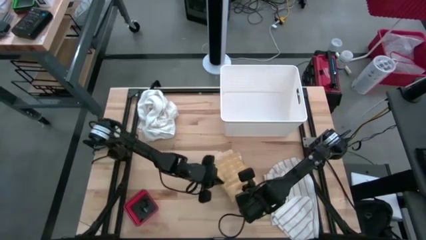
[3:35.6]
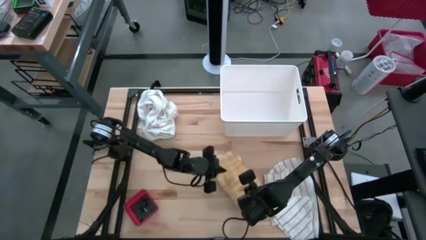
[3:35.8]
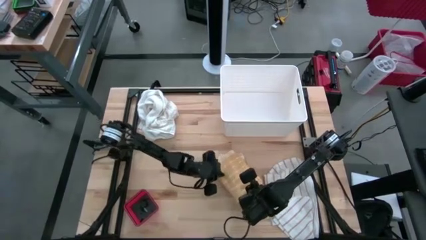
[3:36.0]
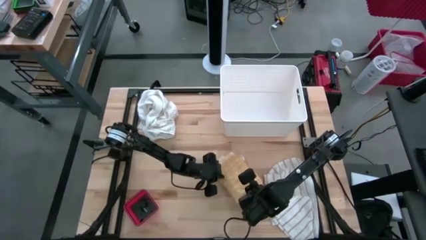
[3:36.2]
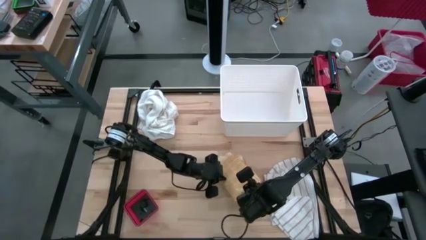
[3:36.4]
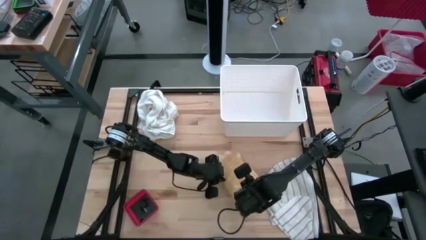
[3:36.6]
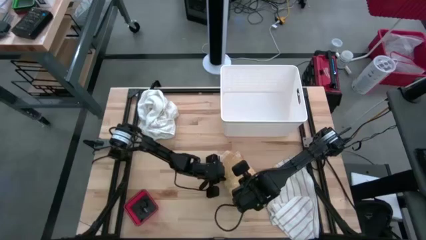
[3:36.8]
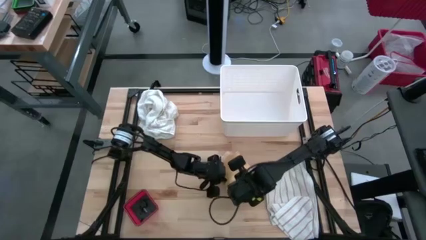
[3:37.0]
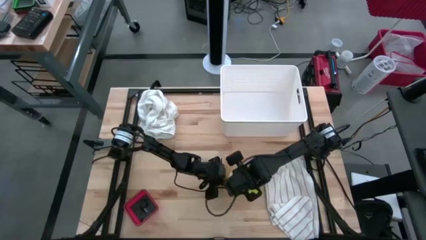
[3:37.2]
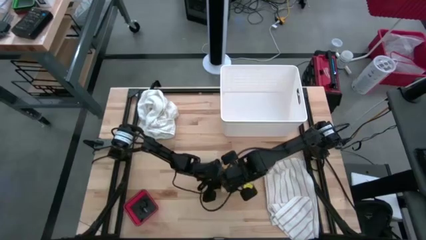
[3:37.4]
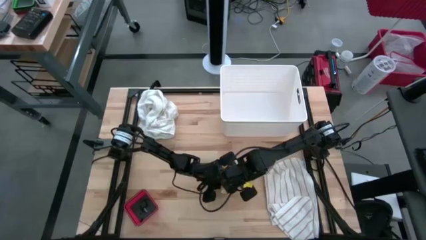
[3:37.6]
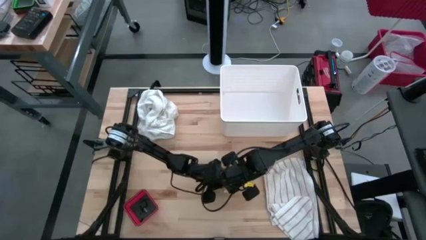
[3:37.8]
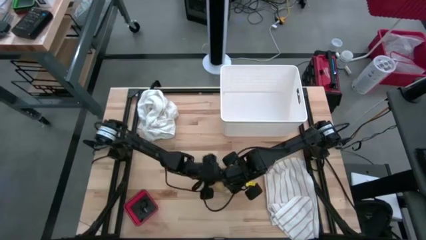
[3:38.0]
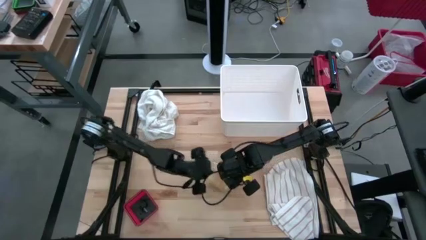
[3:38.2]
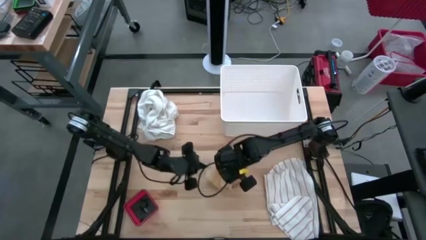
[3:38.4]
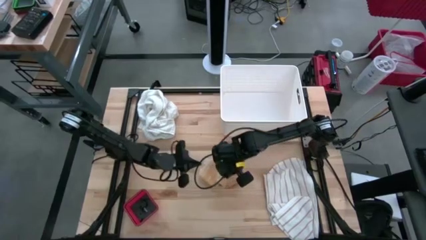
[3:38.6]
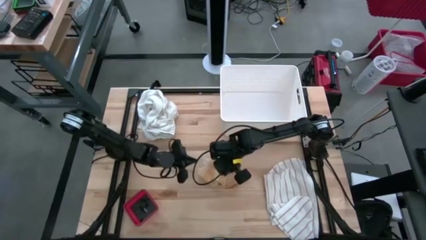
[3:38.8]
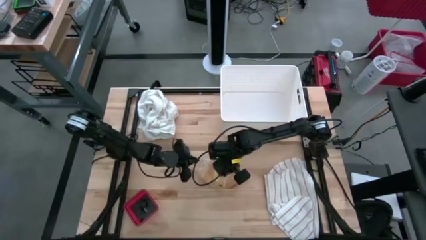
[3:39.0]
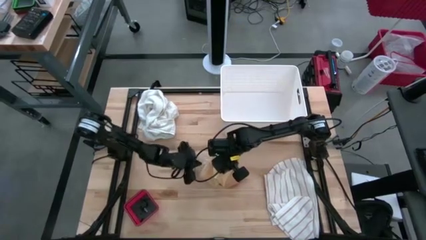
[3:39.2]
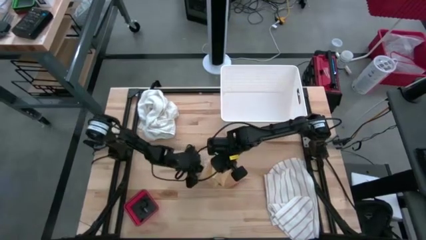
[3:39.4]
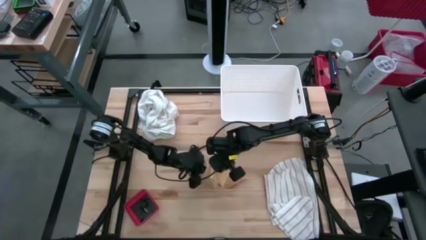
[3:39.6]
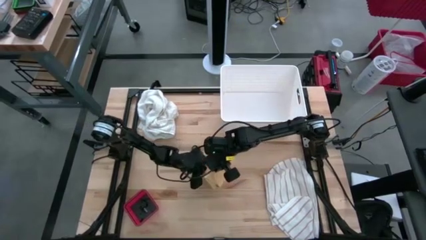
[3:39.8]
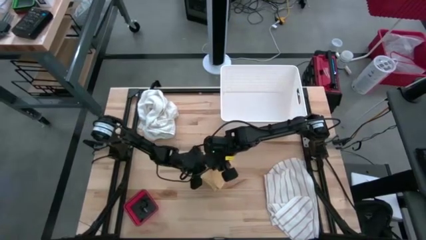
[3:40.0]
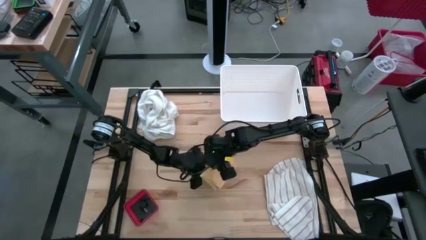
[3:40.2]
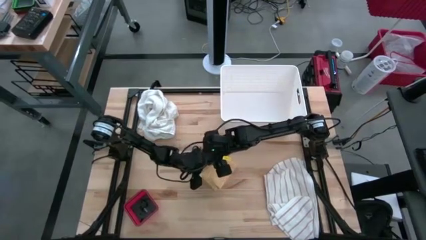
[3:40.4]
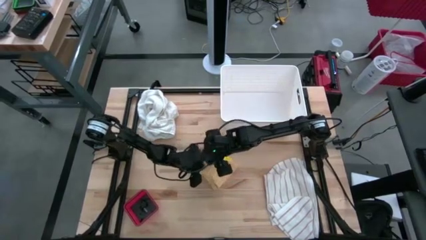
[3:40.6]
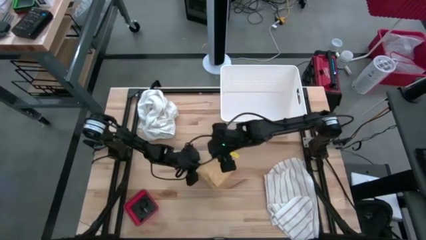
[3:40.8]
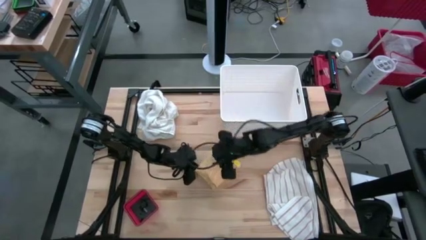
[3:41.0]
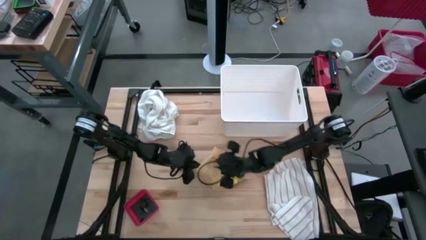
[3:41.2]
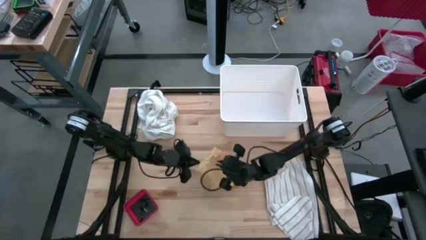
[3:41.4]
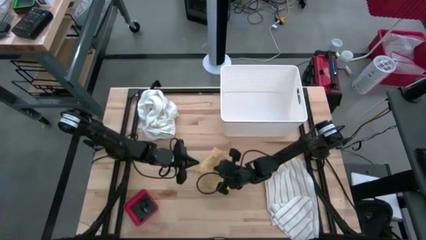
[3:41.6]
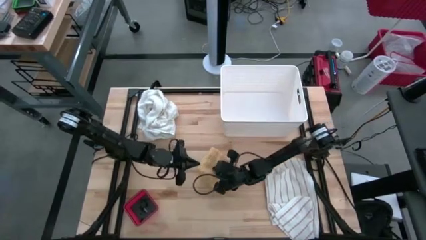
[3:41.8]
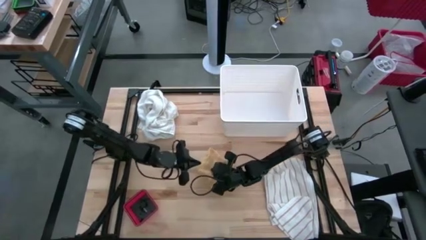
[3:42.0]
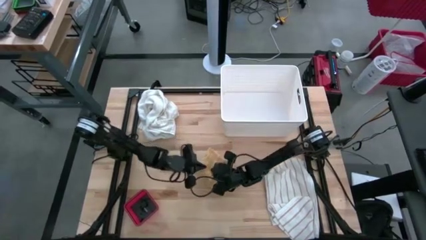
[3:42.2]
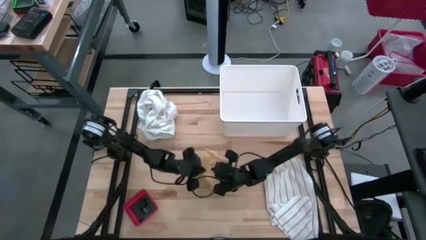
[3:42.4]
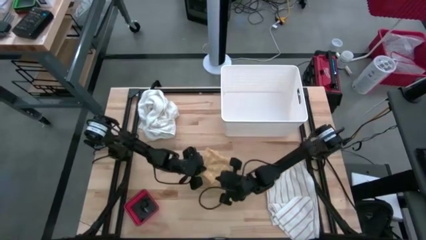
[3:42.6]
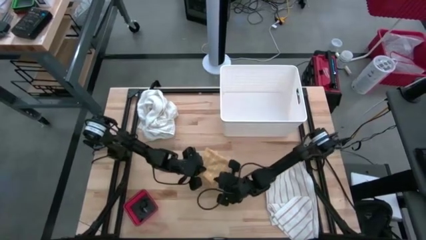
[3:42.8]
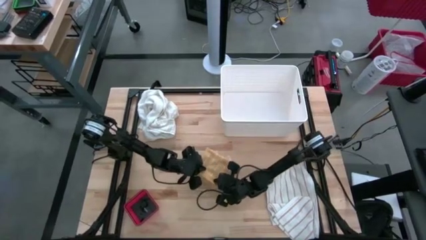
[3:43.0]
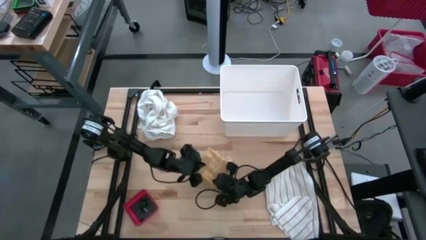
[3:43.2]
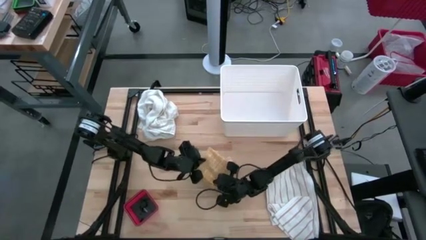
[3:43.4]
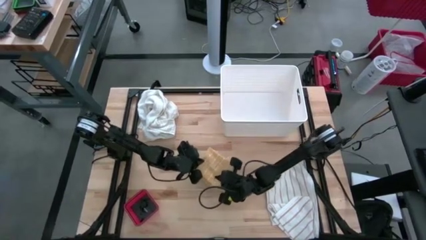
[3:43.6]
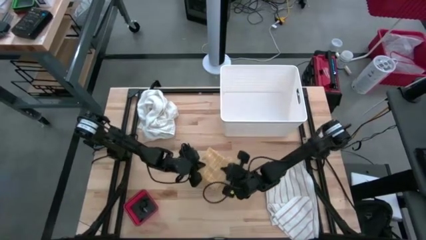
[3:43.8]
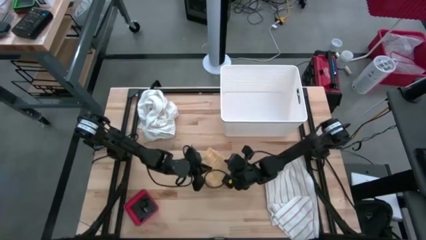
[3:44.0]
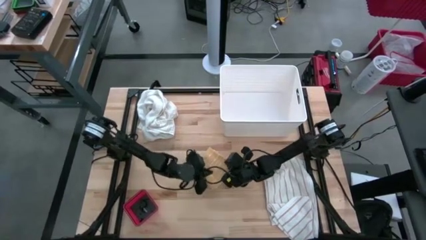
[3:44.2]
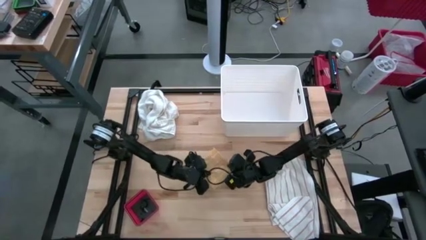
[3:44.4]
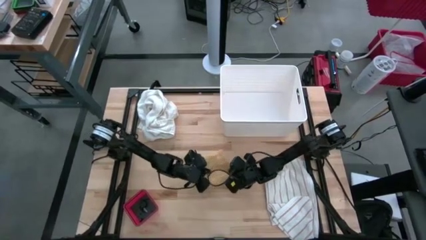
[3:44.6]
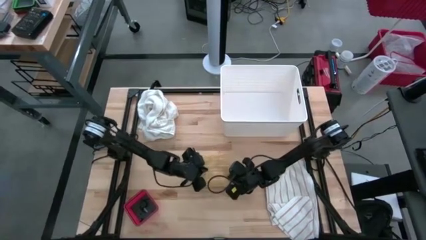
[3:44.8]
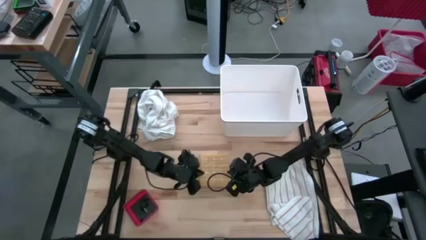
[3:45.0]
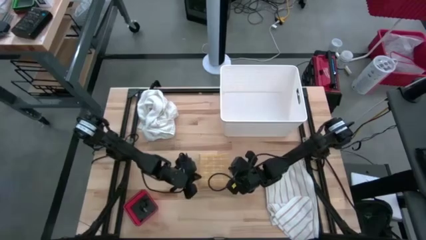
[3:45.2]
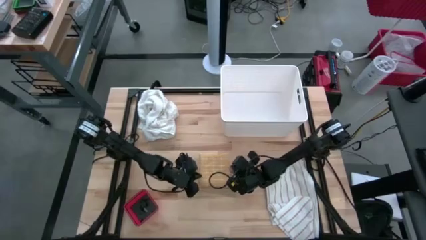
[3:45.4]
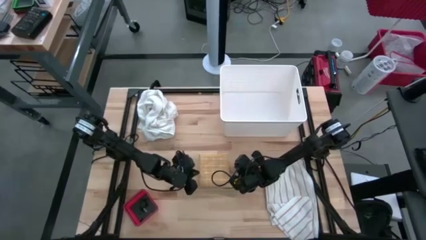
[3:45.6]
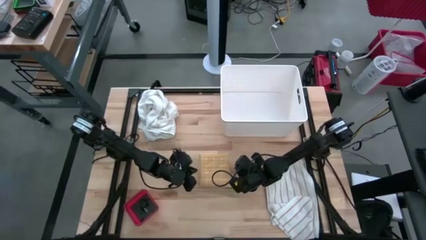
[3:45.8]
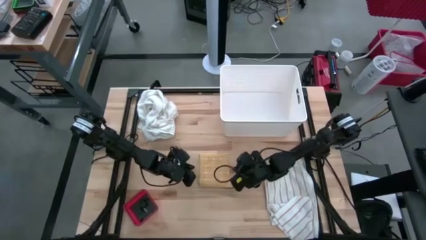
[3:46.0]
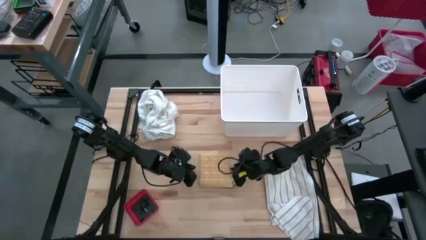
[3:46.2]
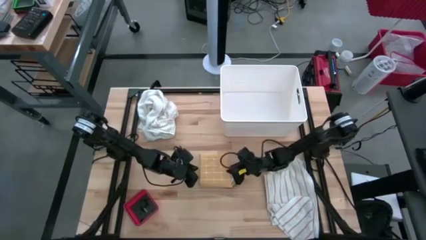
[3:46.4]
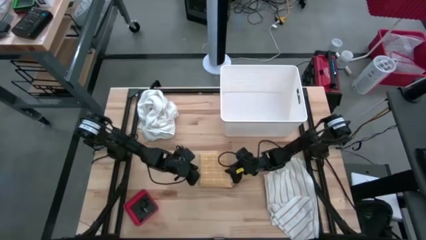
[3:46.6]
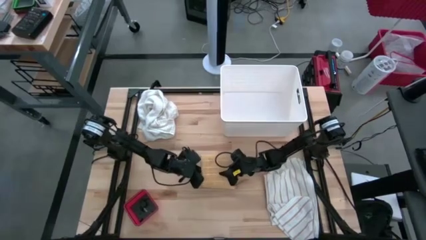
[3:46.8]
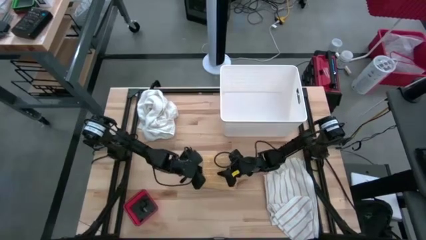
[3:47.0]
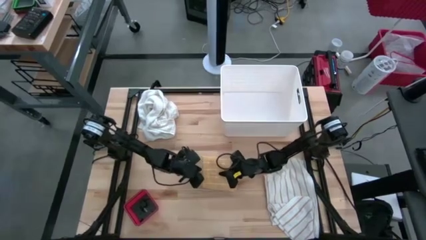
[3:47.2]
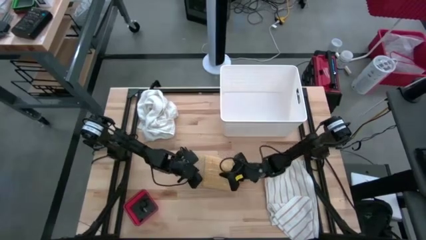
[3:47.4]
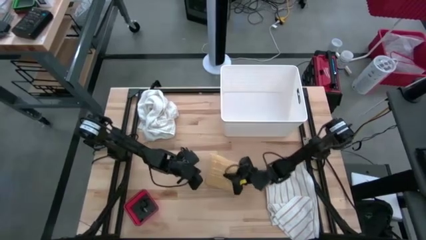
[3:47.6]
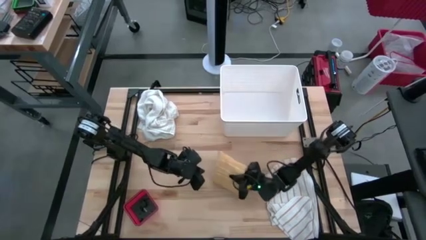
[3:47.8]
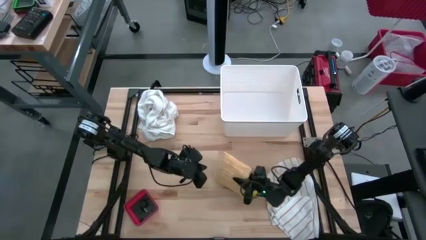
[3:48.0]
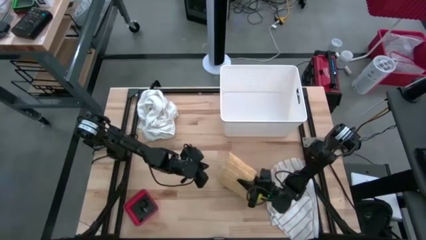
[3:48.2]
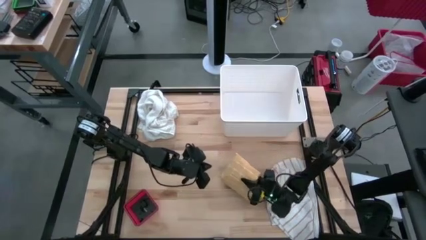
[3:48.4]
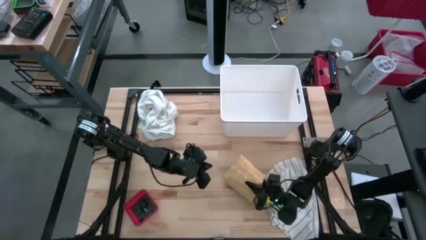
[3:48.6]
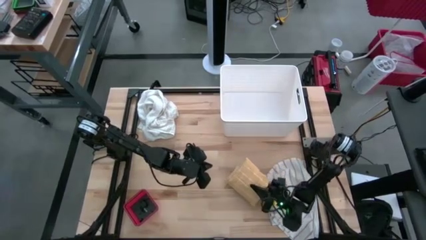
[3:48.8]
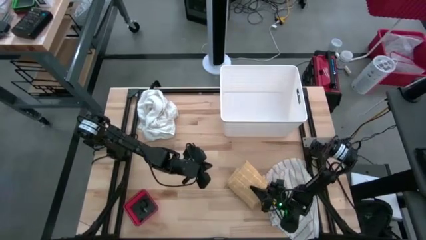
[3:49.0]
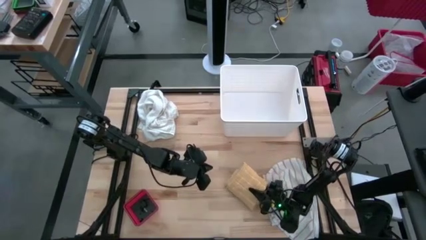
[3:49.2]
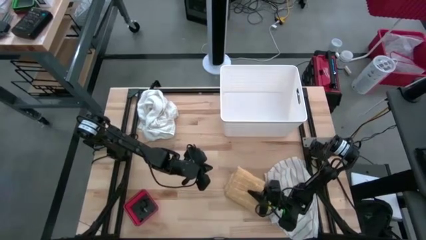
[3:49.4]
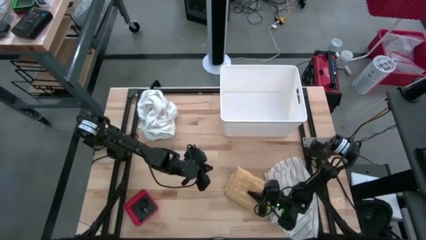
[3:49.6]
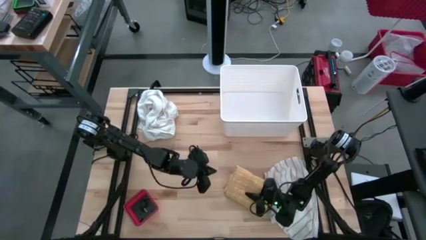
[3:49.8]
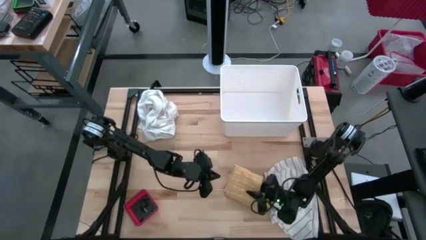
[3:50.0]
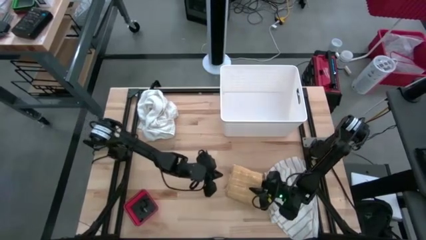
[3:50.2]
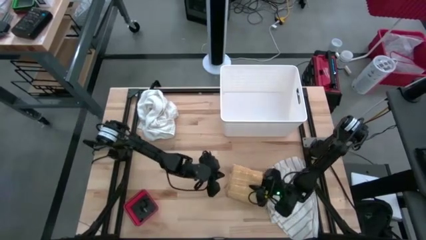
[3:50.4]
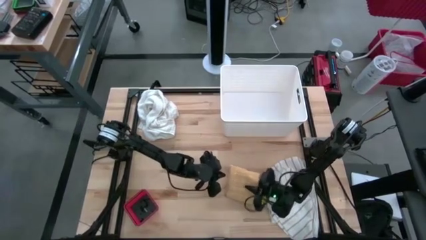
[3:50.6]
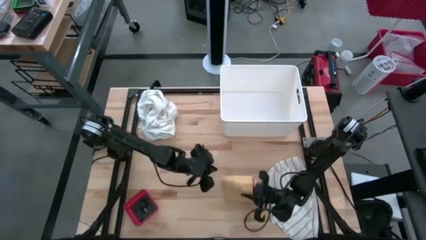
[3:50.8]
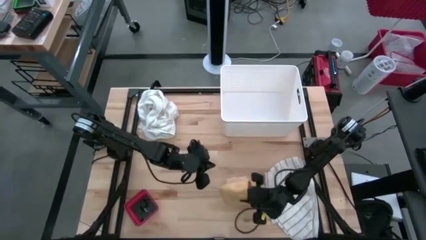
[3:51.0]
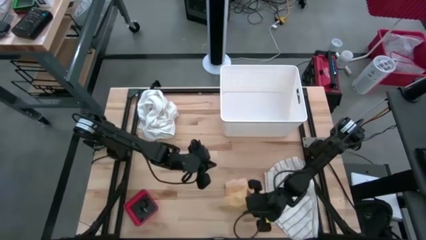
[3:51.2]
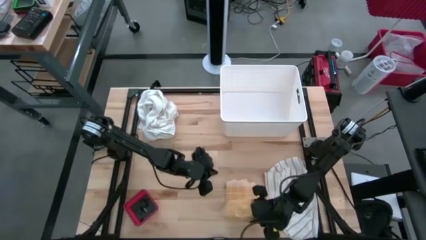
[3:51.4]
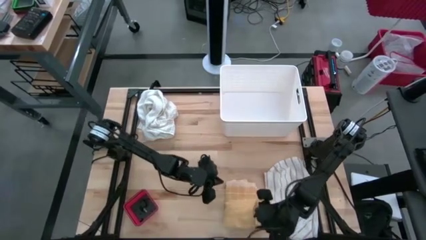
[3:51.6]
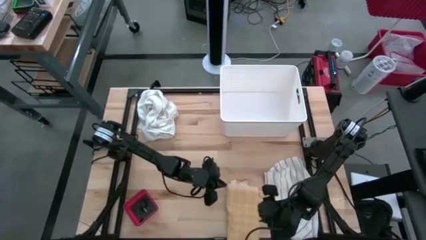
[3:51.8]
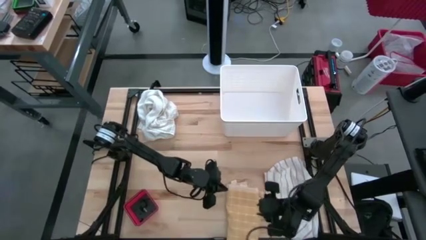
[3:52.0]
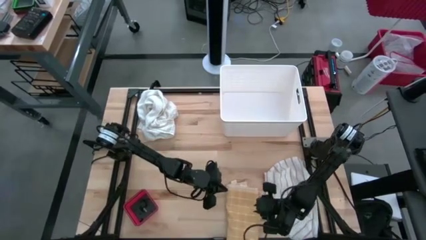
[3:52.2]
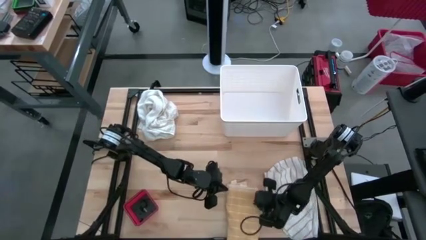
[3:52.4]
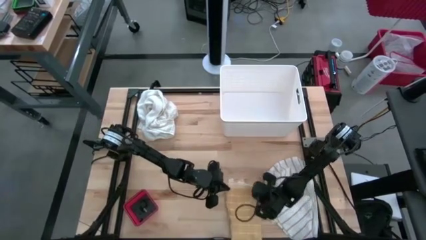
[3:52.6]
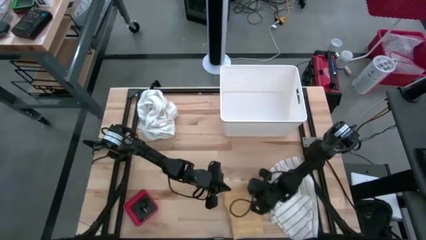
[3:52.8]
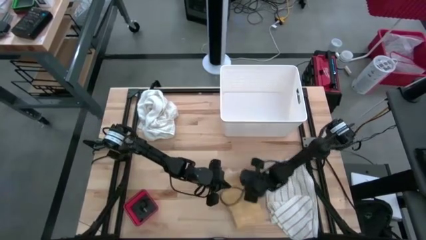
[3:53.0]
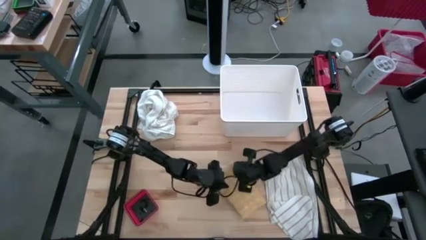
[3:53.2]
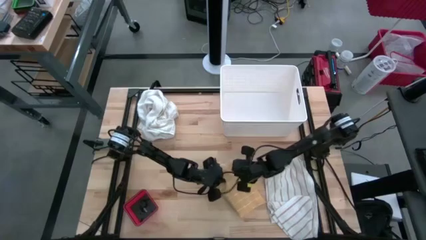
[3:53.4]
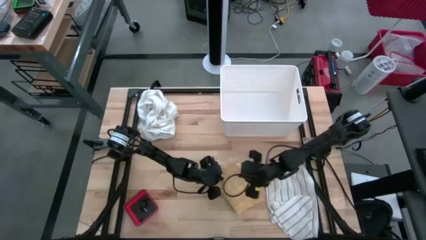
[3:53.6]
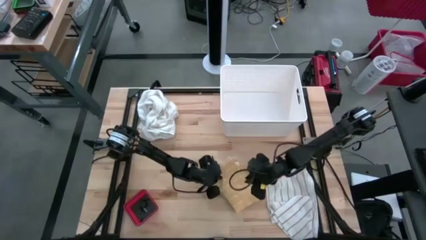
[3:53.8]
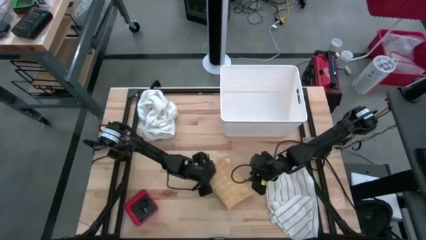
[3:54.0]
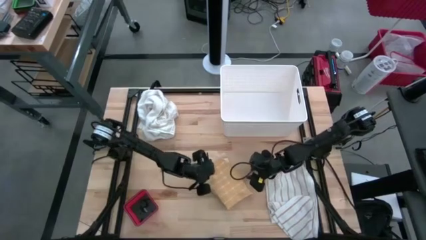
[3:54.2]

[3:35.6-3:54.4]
Task: Fold towel
Fold the yellow kitchen towel
